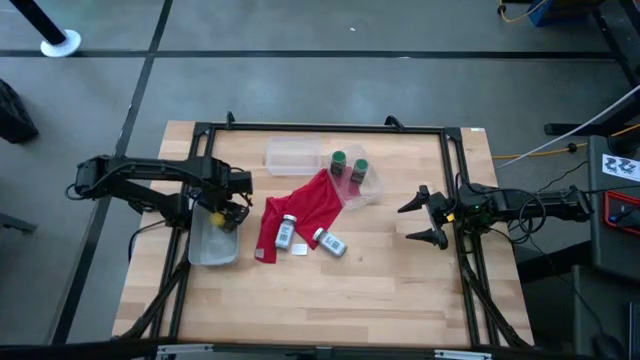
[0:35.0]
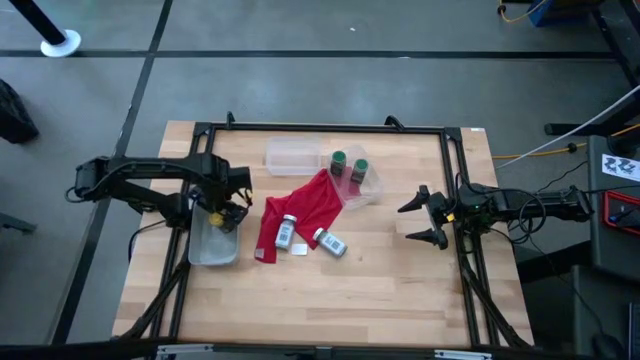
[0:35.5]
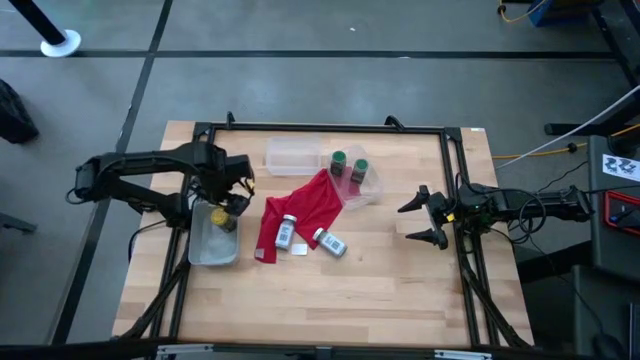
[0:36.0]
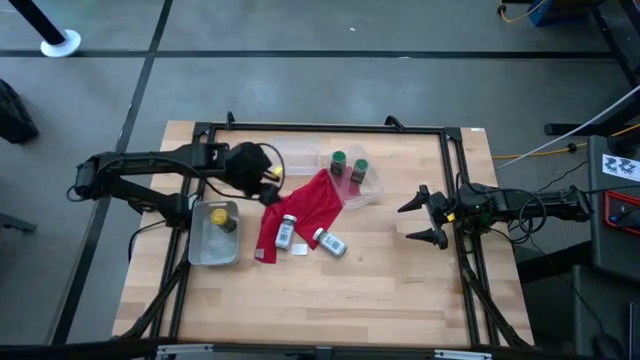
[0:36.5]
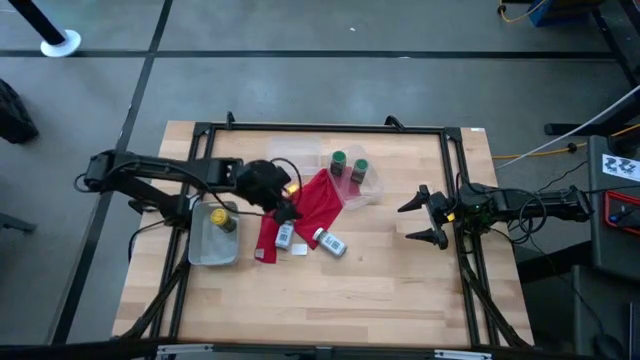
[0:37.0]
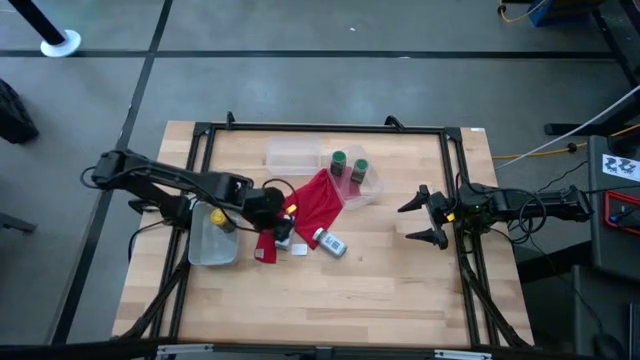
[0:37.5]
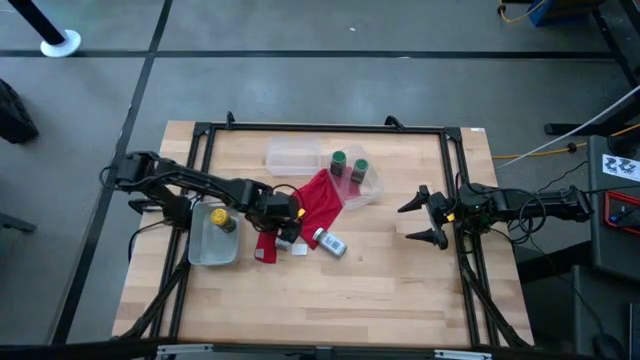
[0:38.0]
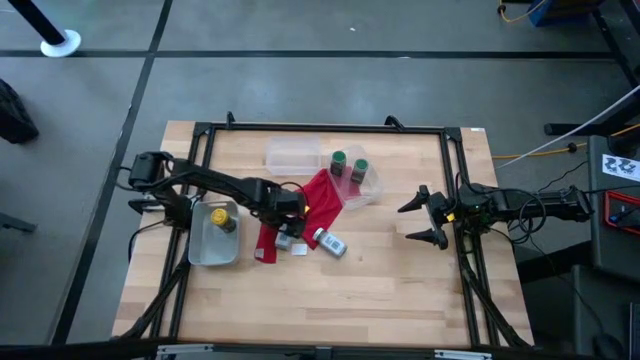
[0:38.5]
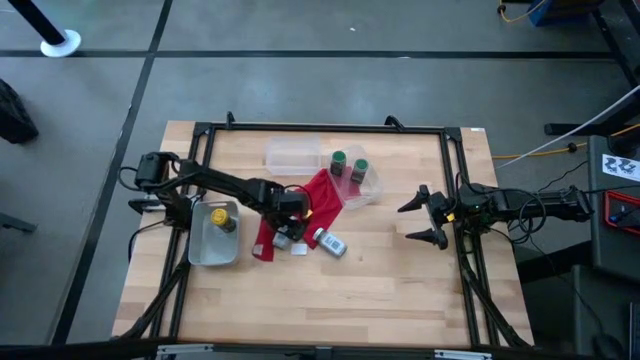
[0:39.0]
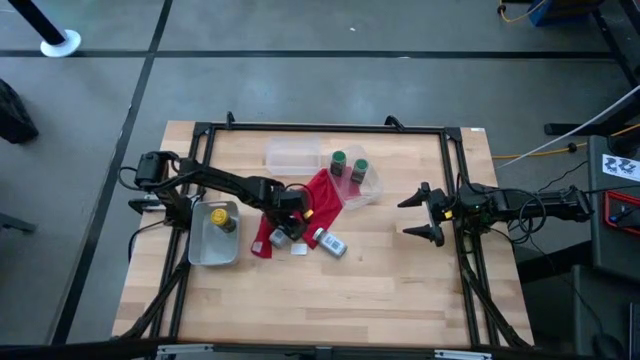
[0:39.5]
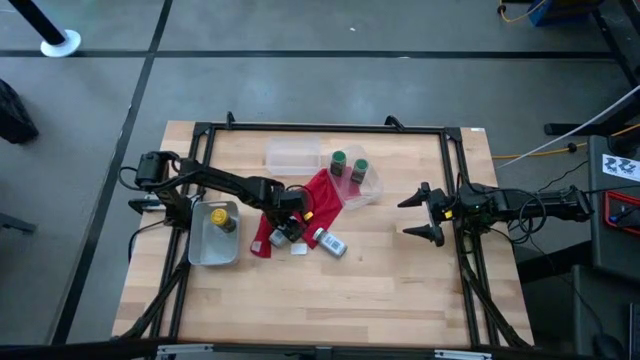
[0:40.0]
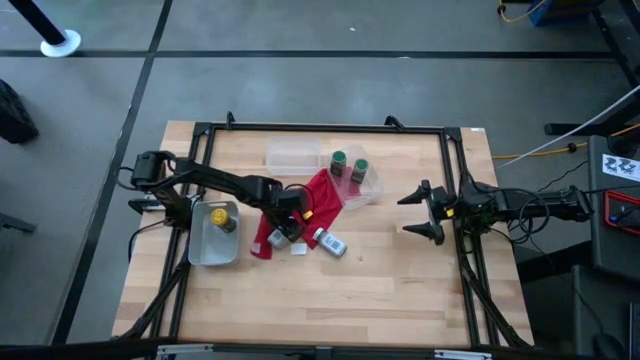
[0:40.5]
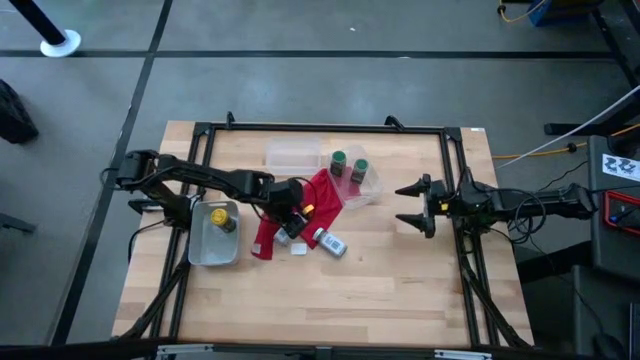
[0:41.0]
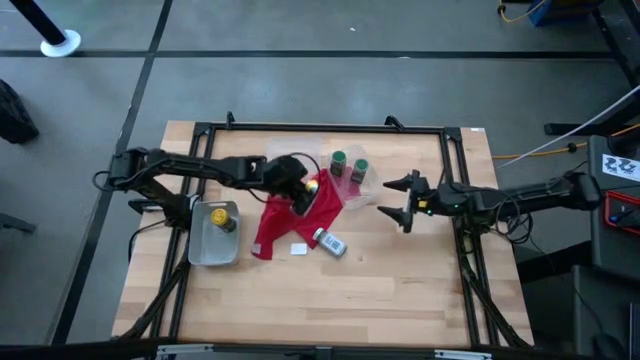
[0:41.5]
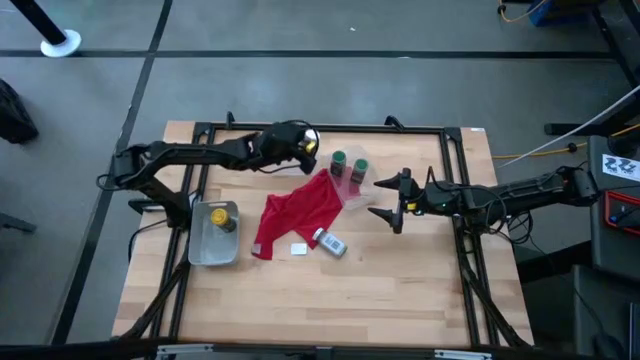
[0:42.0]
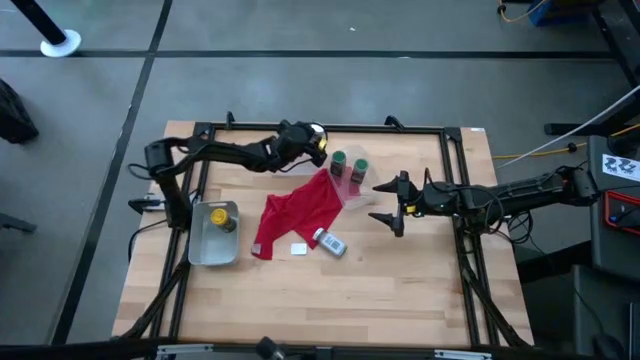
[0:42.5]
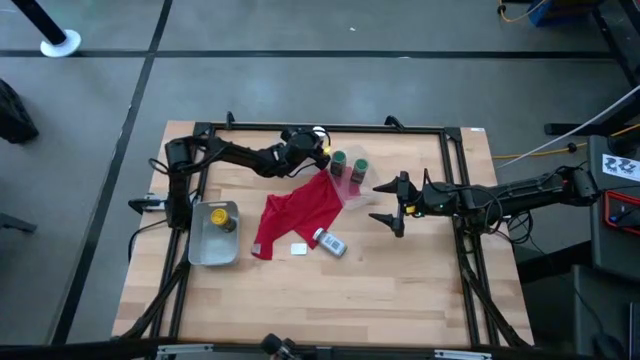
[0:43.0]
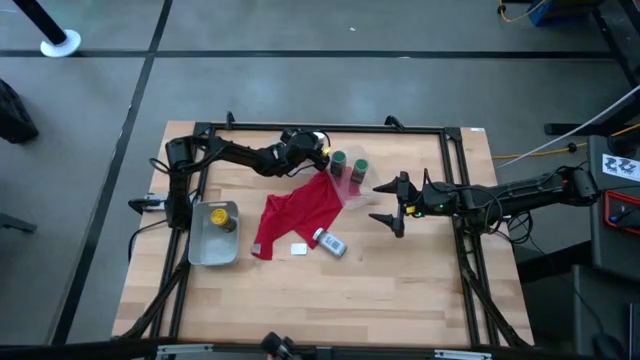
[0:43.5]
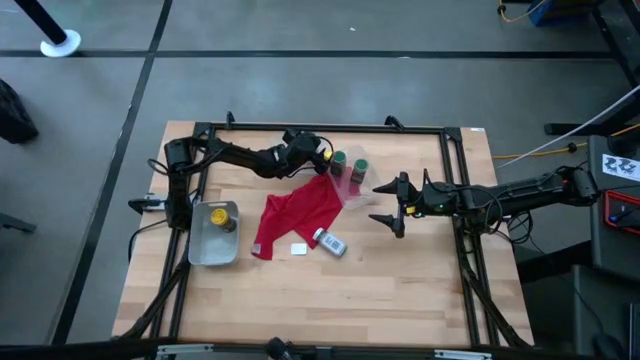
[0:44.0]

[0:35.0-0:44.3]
Task: Sort spices by type
Put the left white seasoning bottle into the left transparent bin

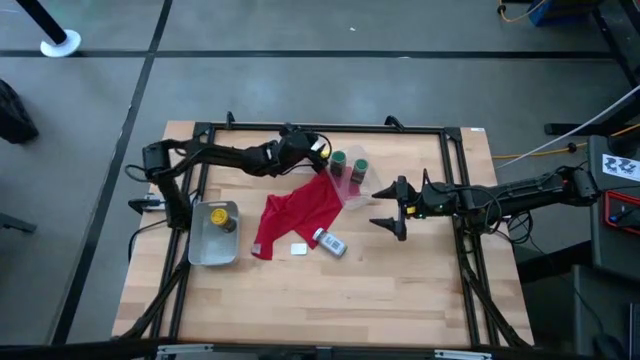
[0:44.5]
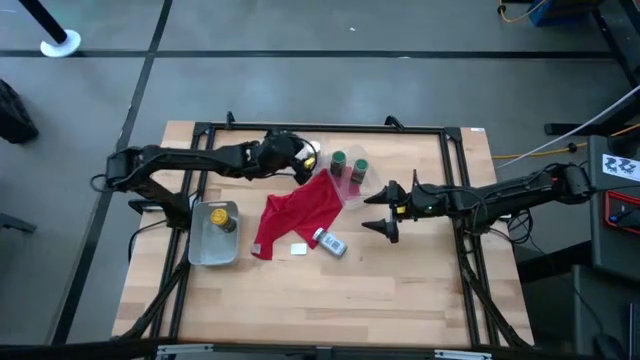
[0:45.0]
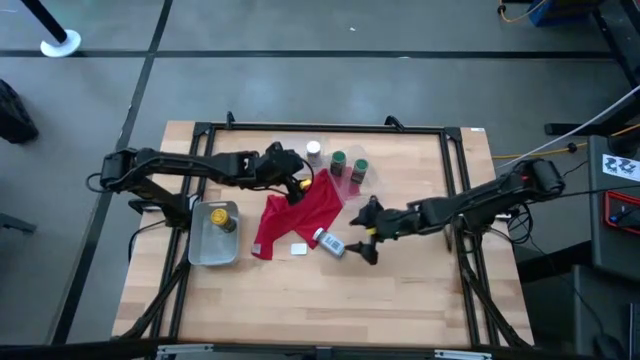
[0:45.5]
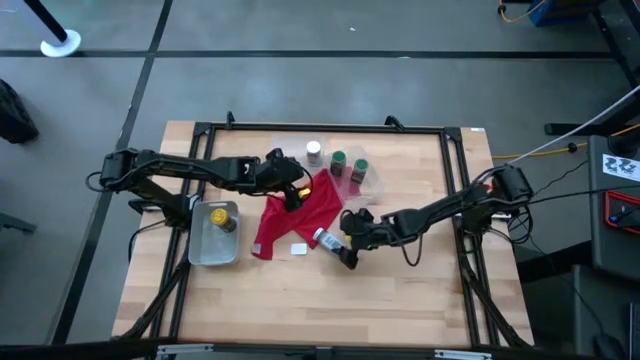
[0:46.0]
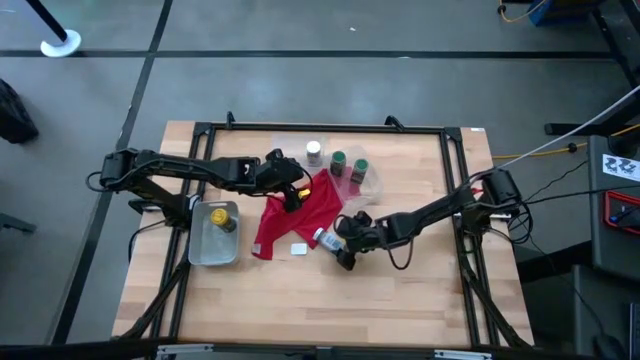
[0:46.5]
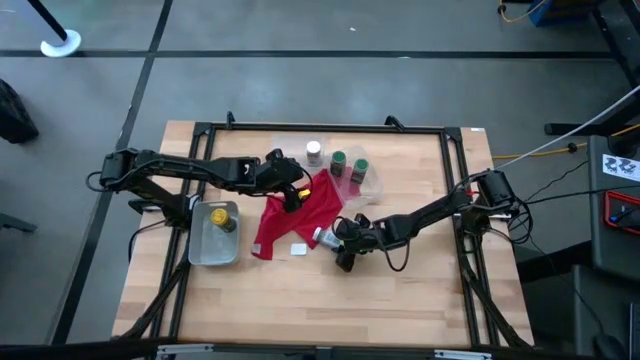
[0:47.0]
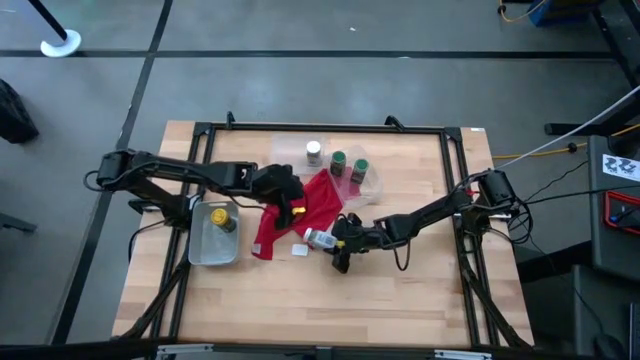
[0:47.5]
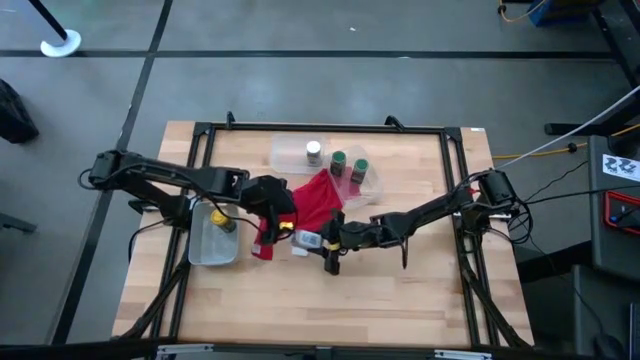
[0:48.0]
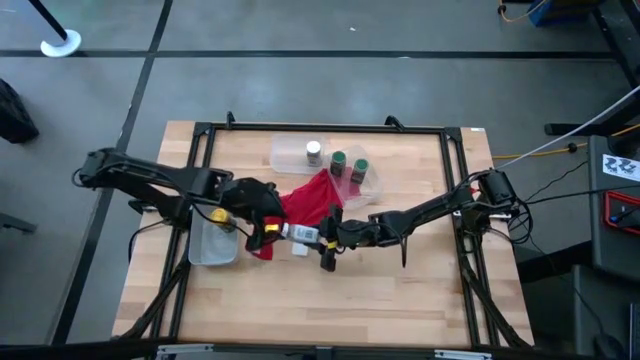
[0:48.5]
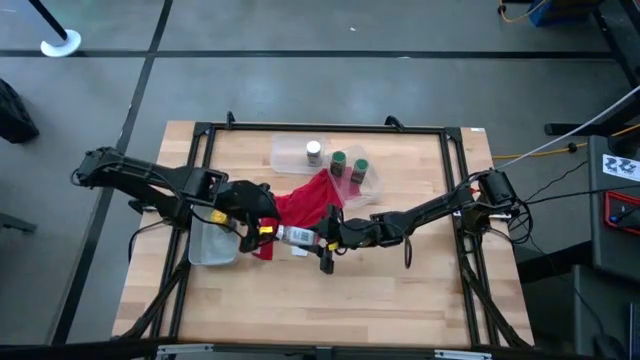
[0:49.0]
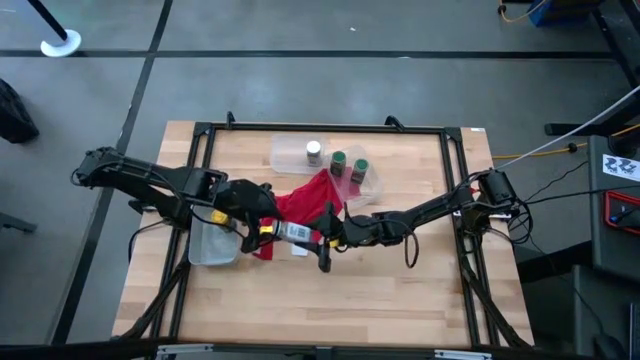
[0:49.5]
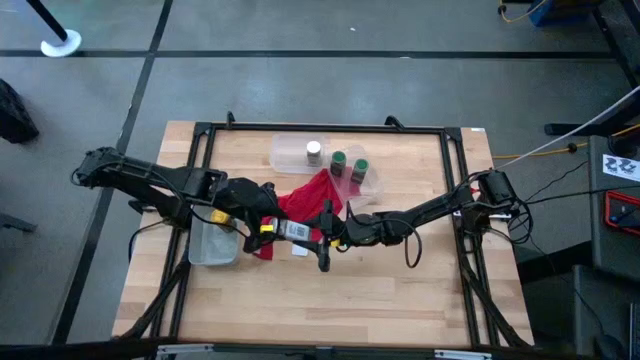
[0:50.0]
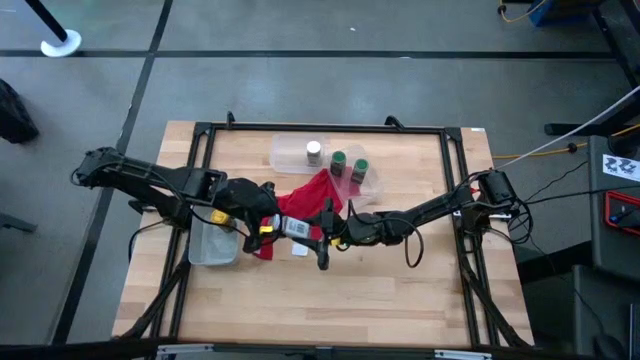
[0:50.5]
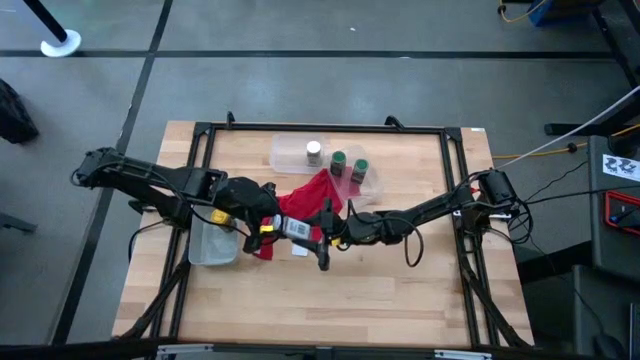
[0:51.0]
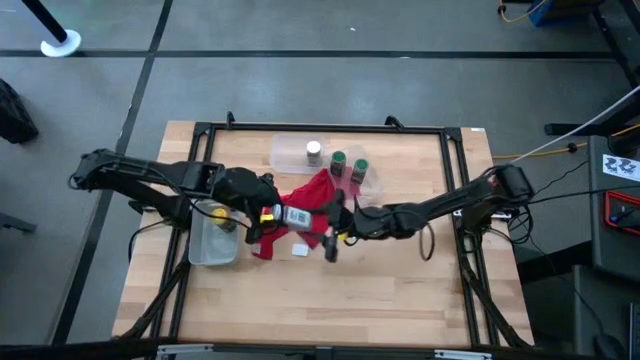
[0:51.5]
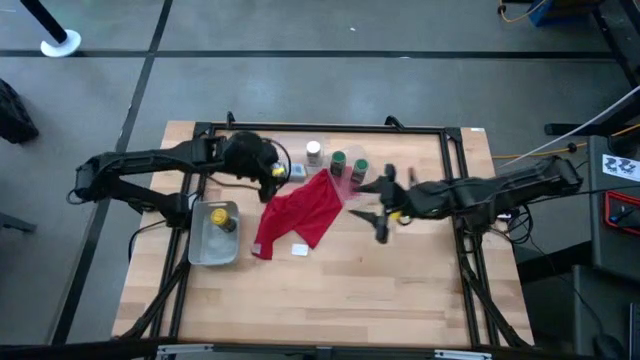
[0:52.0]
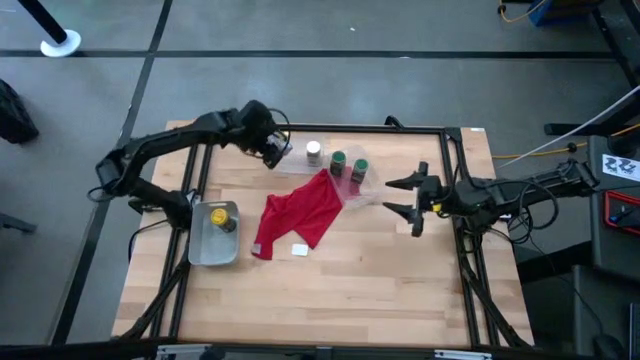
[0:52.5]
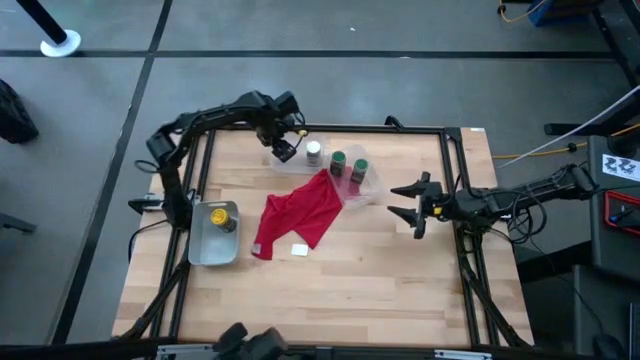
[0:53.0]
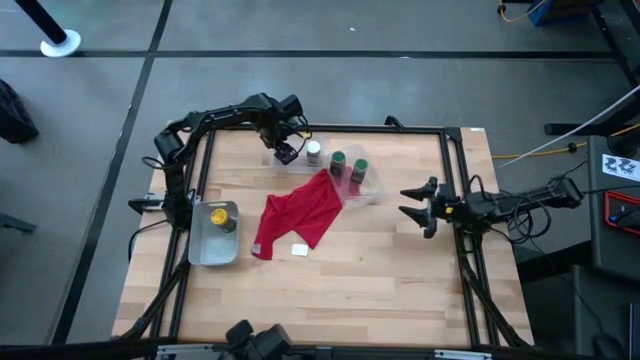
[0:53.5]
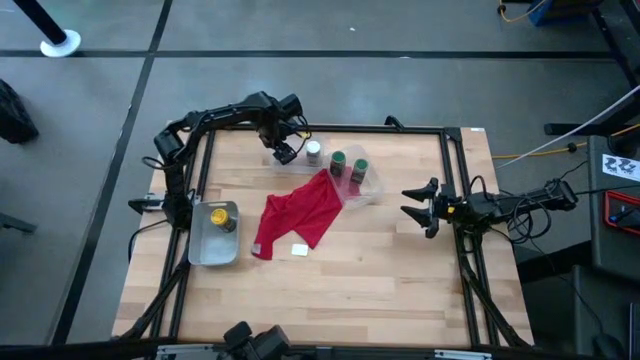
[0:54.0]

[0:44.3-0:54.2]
Put the white seasoning bottle into the left transparent bin

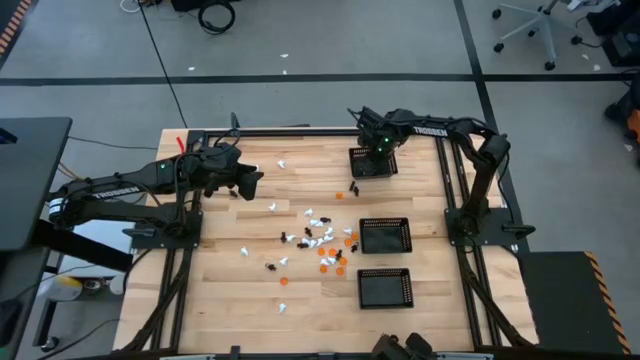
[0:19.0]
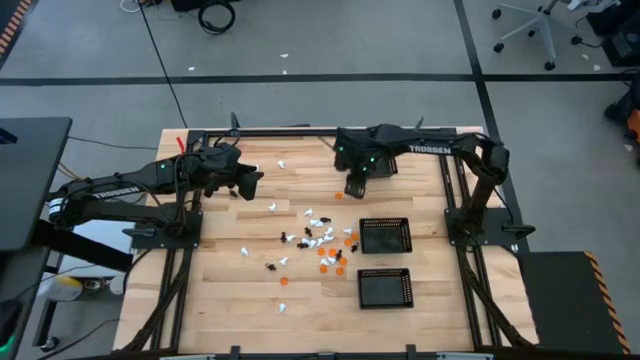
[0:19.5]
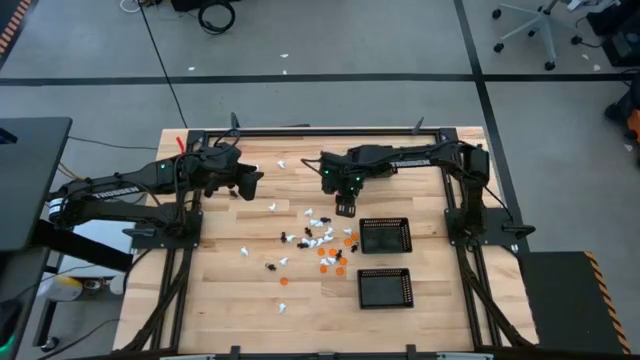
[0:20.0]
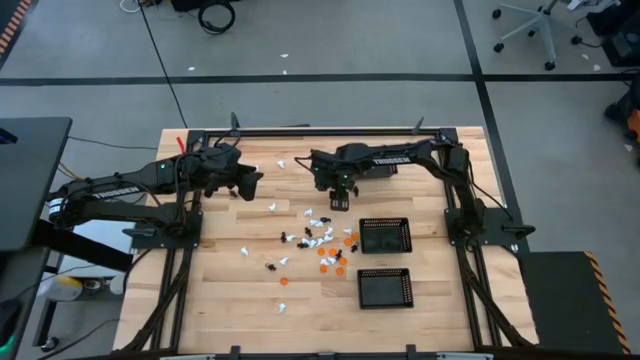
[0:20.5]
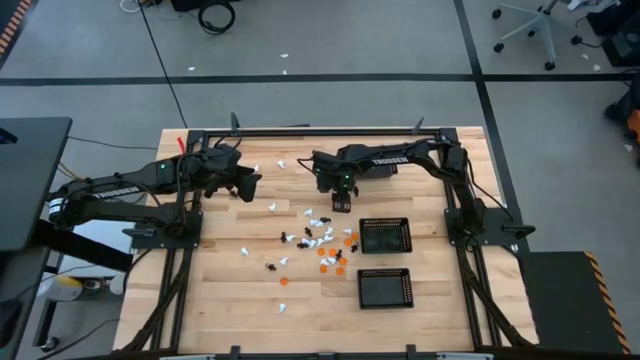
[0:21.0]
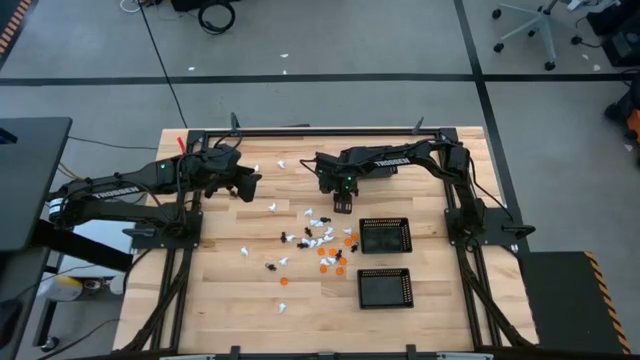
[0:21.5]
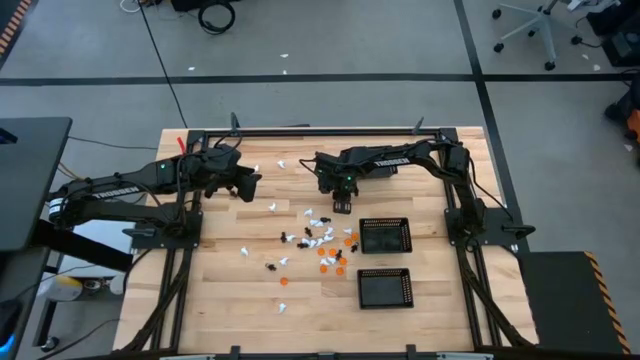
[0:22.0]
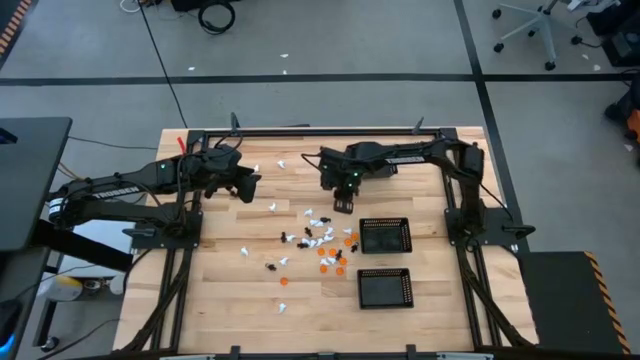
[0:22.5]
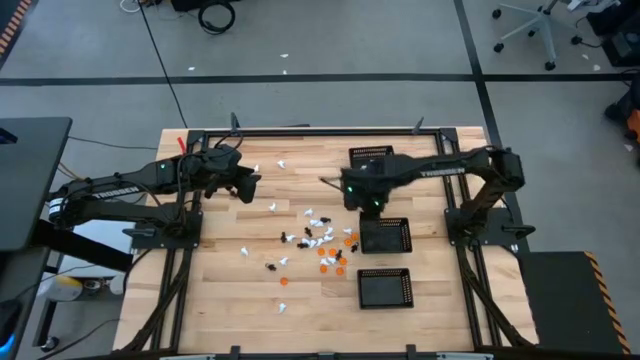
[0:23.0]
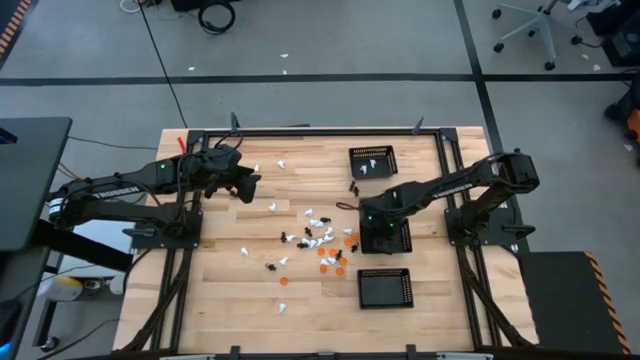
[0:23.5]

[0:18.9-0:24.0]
Task: Sort Halloween decoration
Put the orange pumpkin toy into the center black bin
